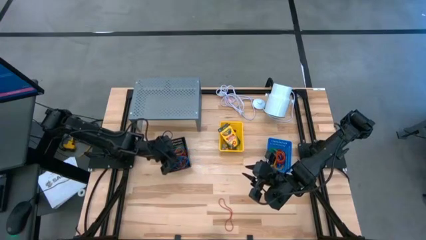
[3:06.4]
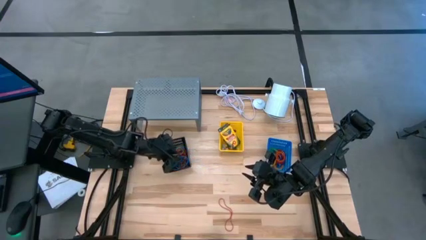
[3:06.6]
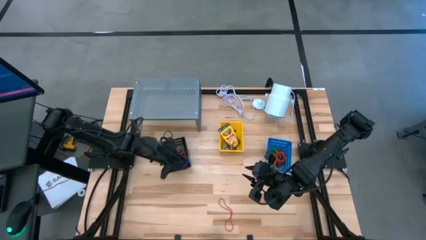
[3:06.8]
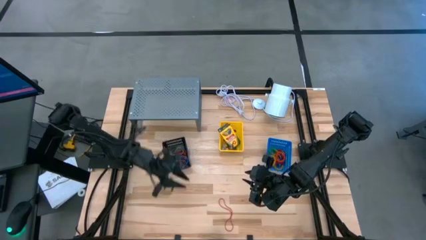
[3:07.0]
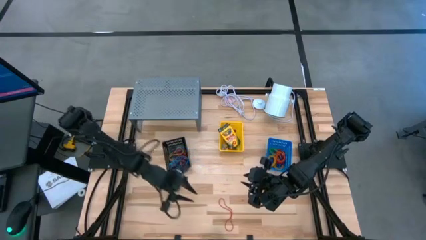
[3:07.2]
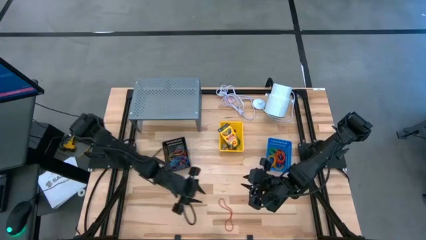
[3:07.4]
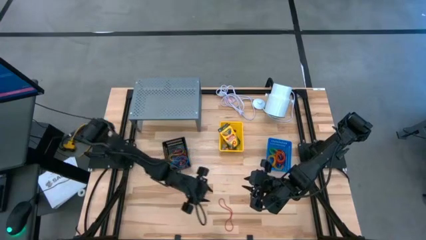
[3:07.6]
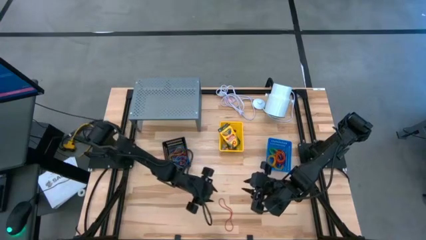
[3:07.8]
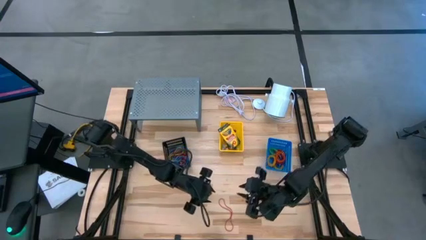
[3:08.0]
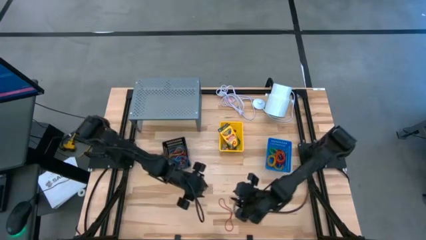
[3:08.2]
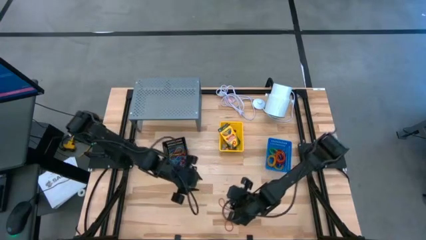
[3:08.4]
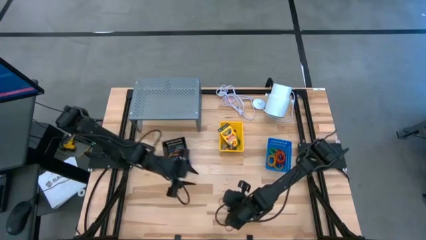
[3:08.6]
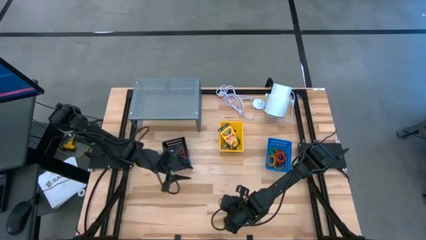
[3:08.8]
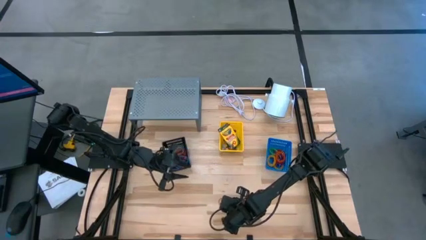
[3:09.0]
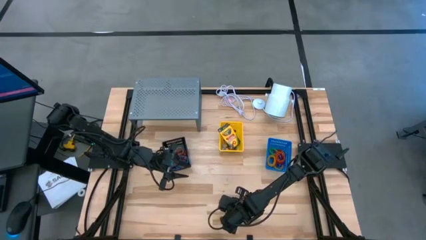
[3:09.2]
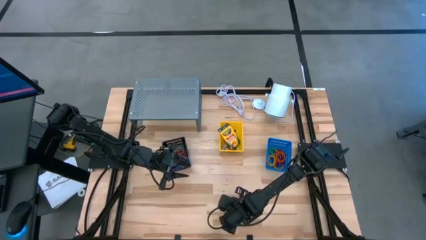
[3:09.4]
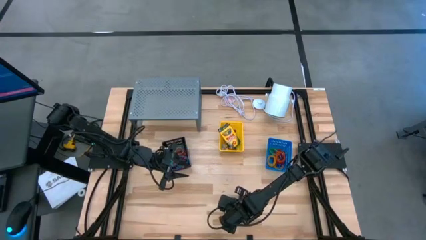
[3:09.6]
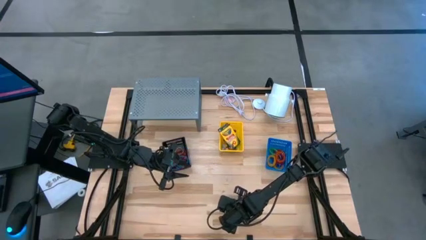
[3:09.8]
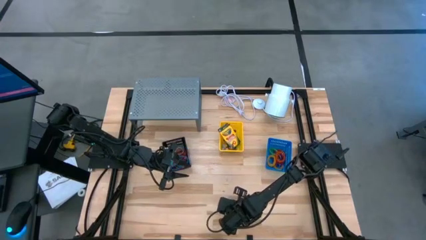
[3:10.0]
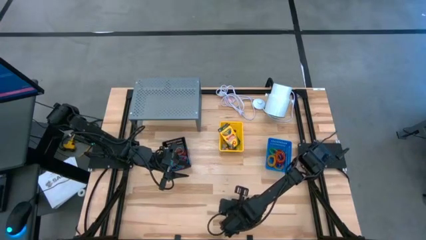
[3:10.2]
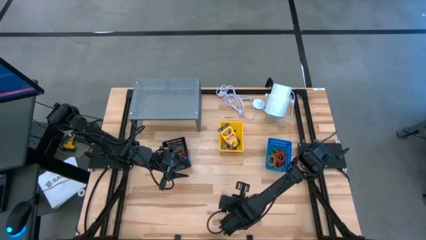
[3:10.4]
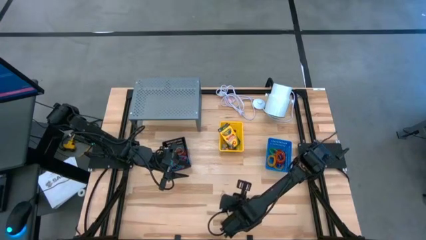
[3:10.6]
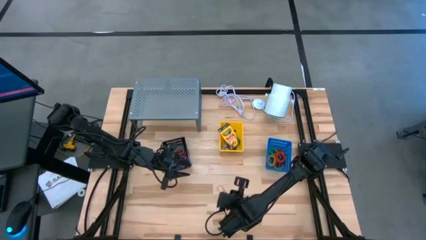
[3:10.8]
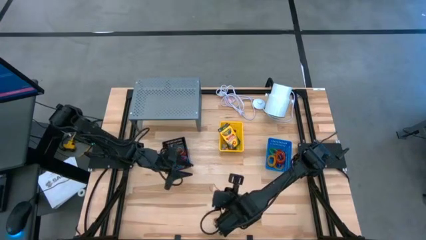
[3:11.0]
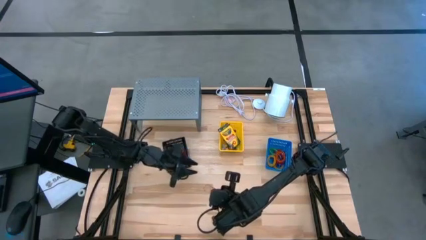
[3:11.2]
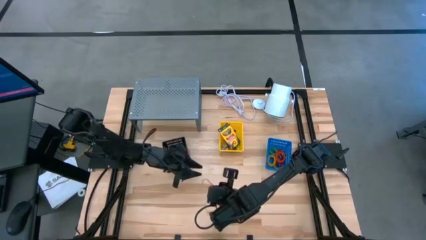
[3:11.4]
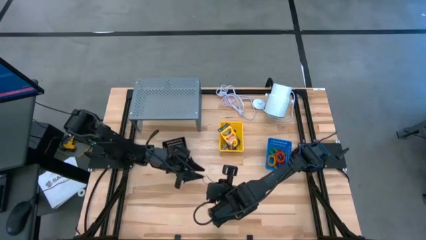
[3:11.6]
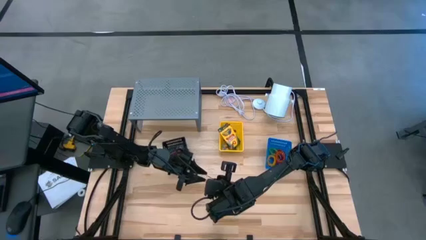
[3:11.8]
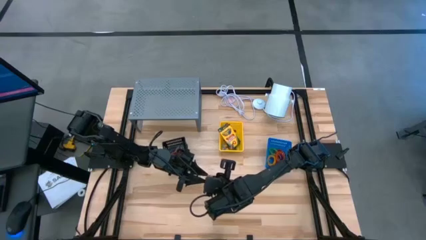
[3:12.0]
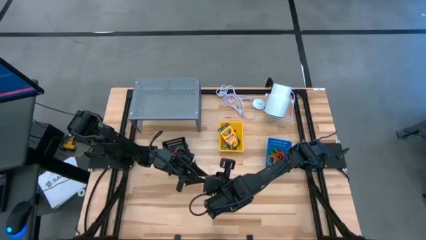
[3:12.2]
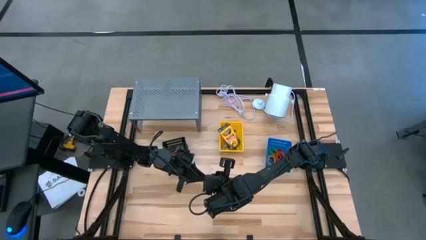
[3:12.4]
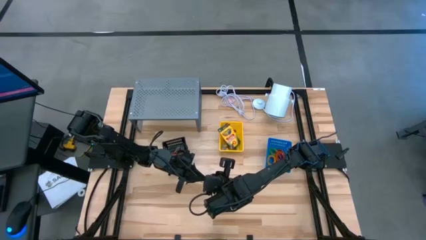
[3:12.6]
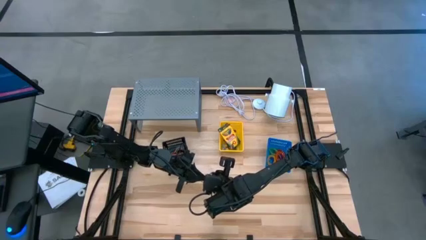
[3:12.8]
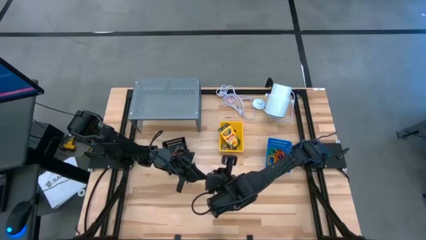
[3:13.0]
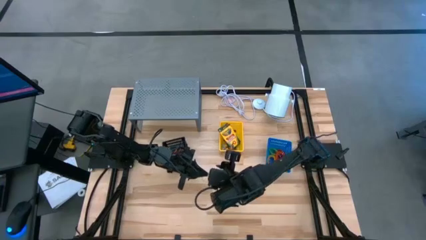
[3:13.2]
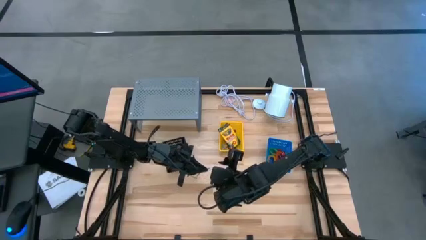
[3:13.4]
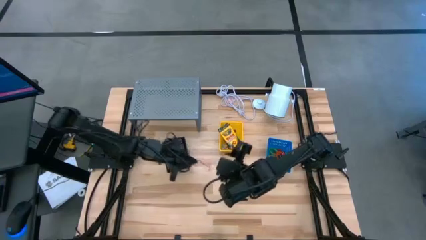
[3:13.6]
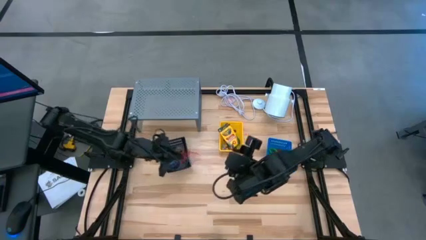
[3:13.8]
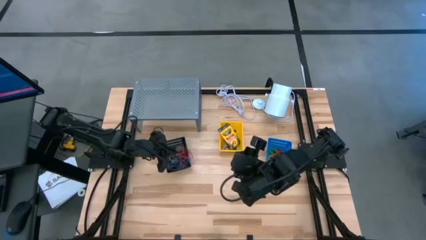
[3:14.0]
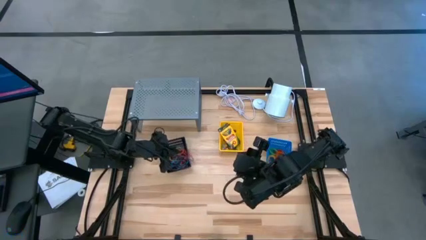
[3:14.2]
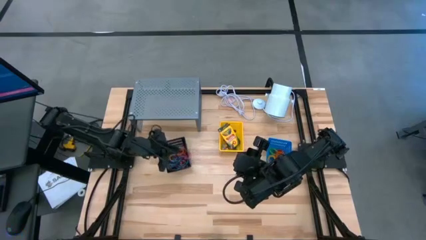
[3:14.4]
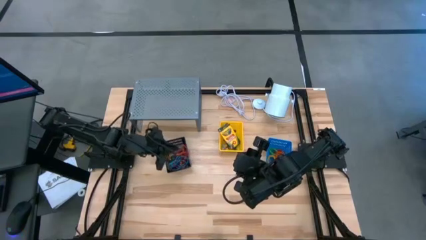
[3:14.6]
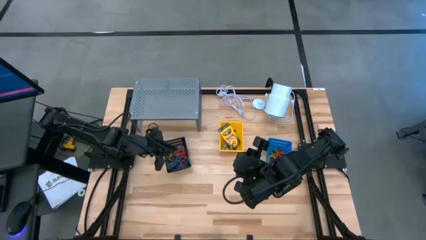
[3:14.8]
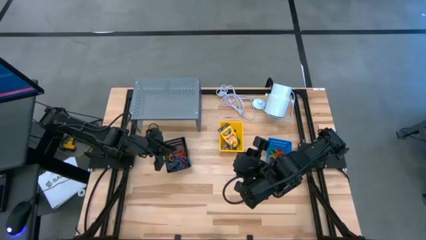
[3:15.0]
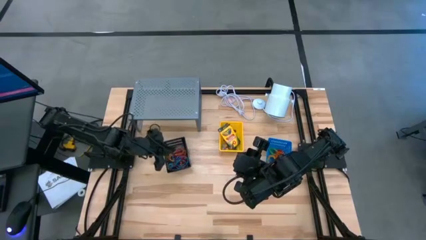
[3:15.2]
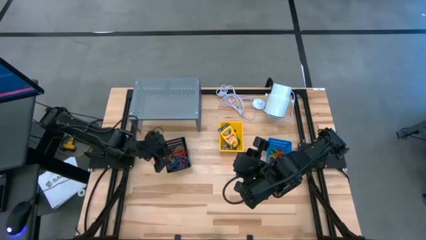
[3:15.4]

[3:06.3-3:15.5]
Task: Pick & Place Office Desk Supplies
Put the red rubber band into the black bin

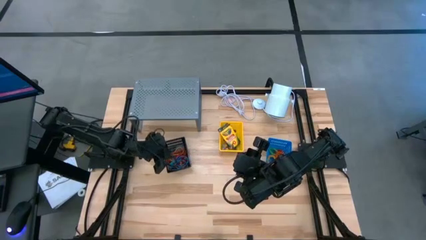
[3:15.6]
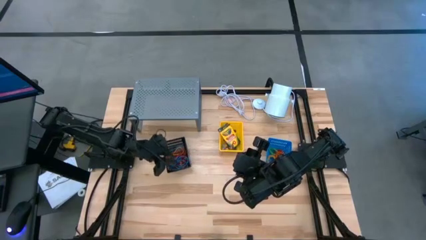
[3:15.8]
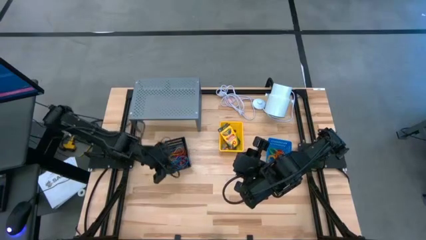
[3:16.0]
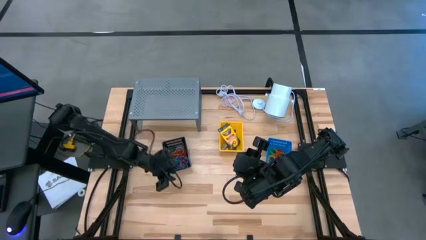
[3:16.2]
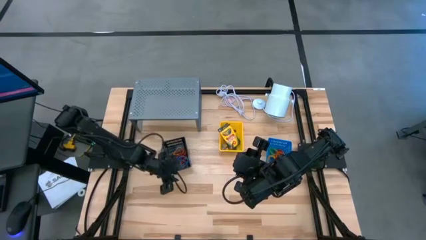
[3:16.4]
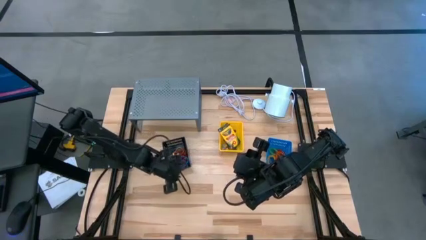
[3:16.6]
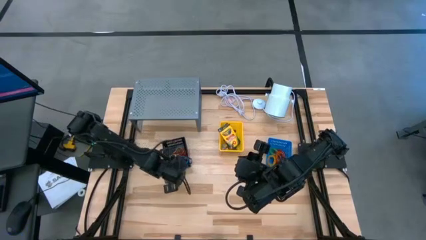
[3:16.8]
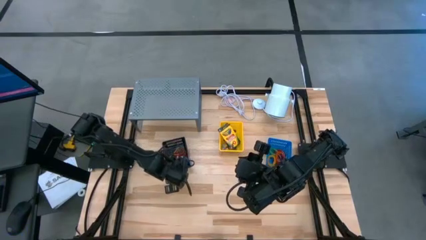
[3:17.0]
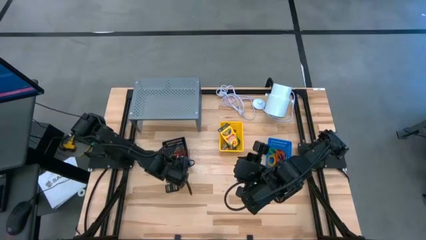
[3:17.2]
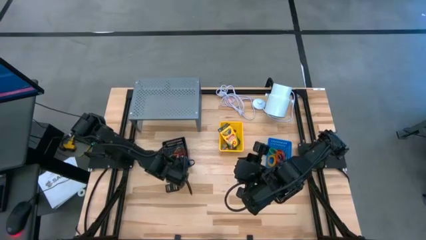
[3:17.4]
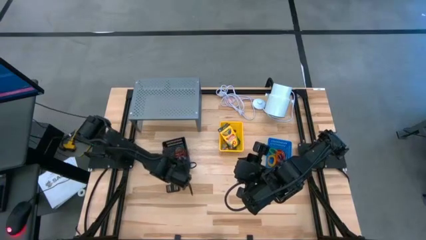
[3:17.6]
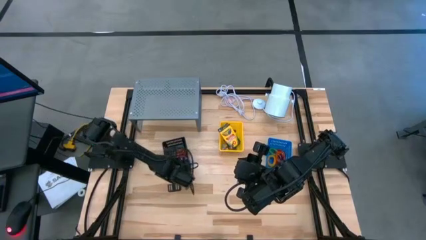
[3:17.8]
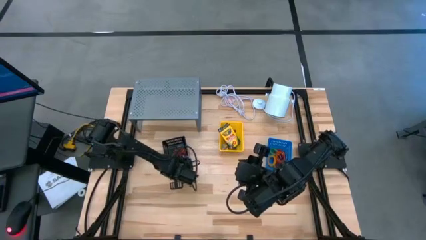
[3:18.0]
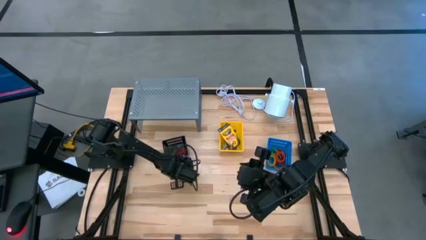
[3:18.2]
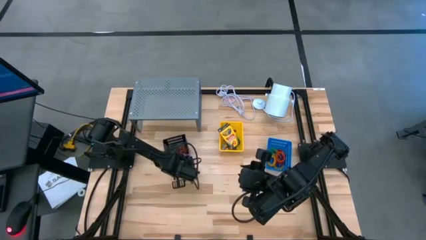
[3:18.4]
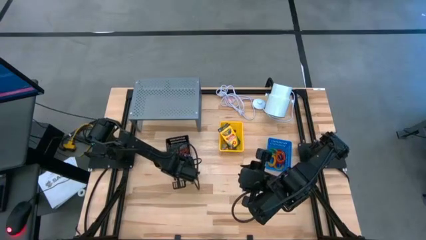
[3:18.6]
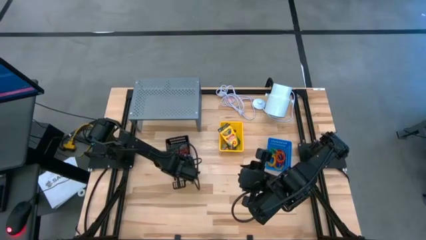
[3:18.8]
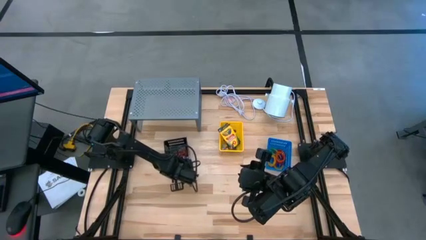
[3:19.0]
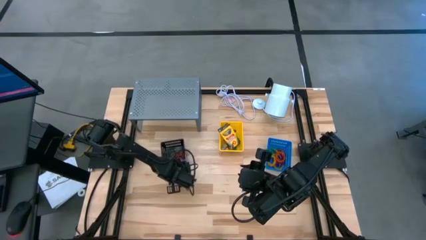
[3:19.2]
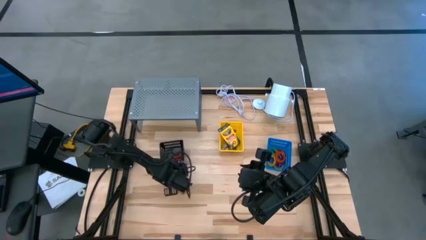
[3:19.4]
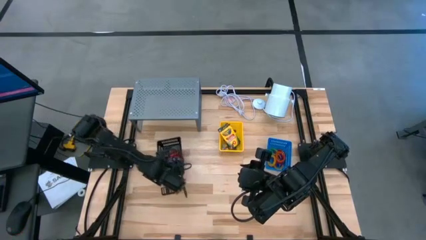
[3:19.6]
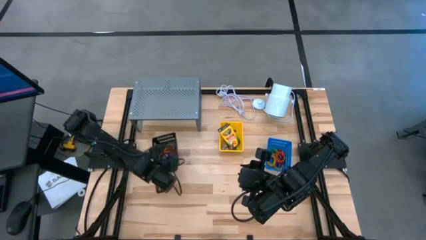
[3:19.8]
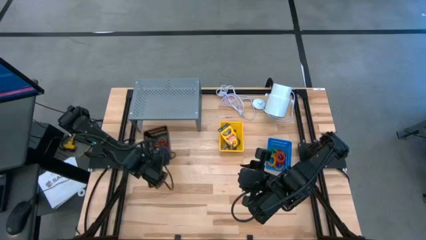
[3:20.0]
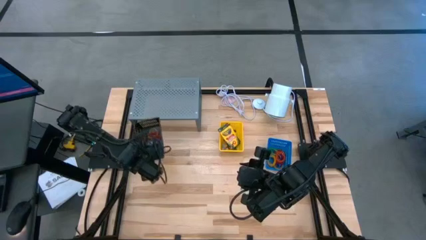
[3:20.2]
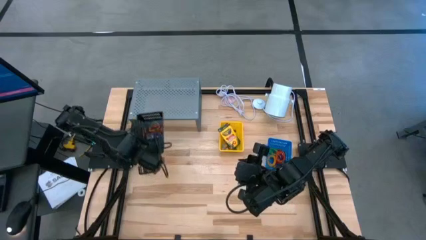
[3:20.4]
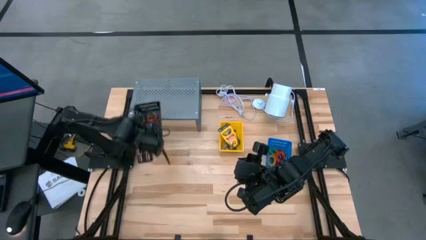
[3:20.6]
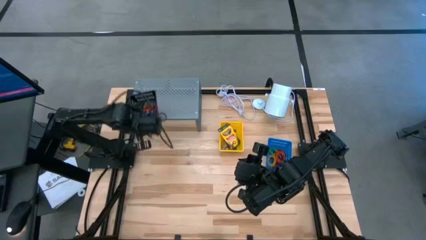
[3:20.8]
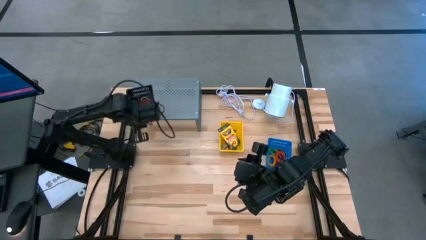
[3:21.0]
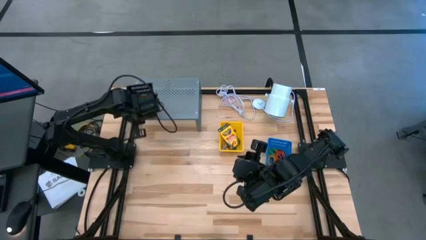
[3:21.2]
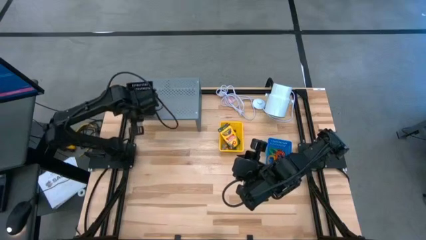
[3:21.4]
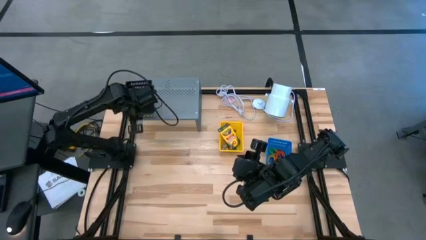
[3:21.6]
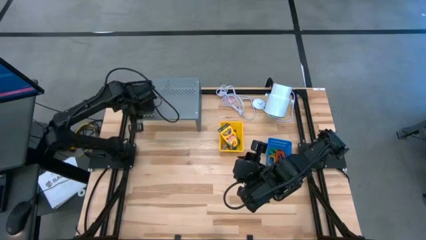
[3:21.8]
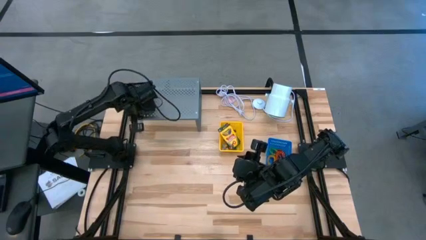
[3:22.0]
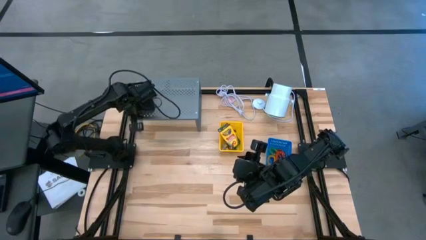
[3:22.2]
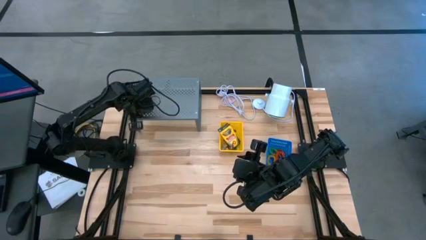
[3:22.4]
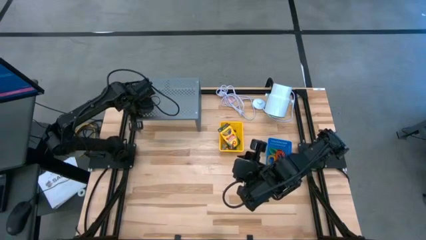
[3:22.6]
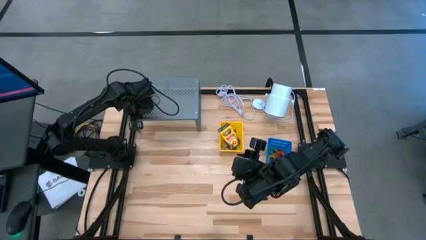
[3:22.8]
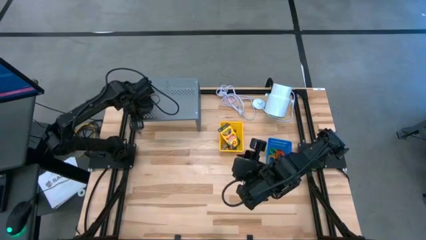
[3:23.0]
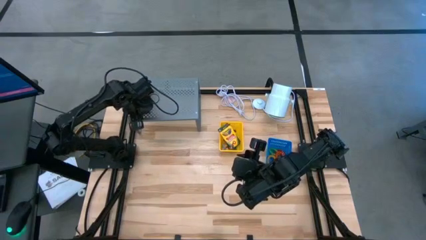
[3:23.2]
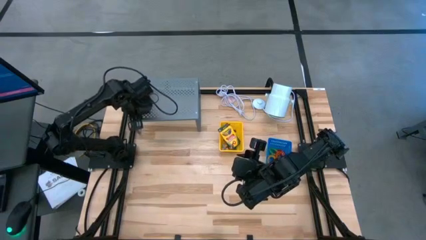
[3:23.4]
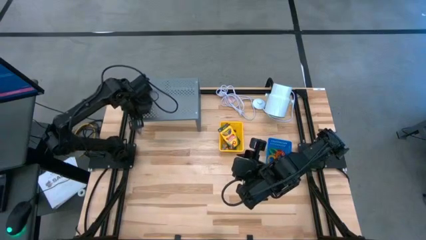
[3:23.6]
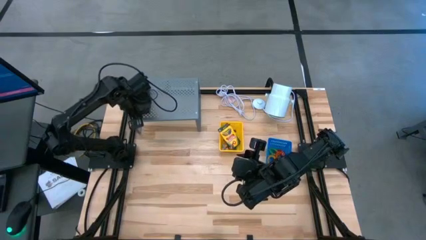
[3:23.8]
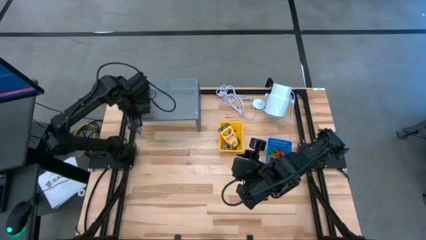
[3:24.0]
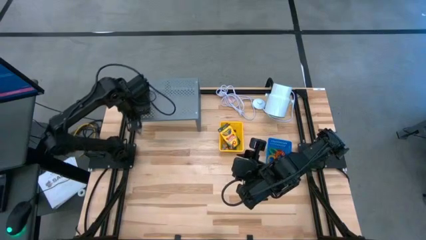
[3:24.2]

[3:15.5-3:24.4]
Put the black bin on the shelf
